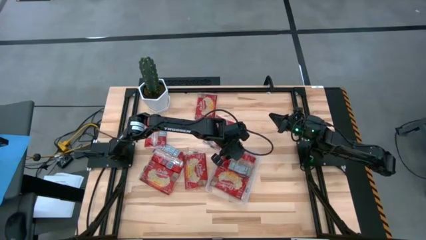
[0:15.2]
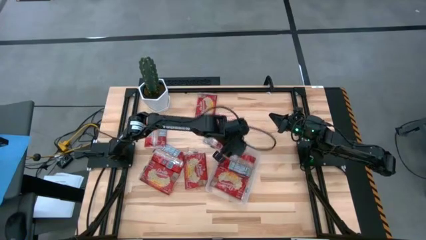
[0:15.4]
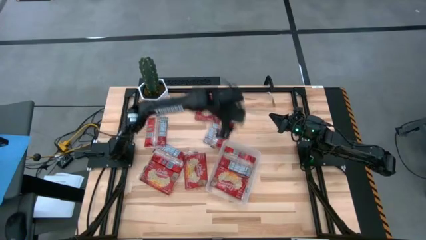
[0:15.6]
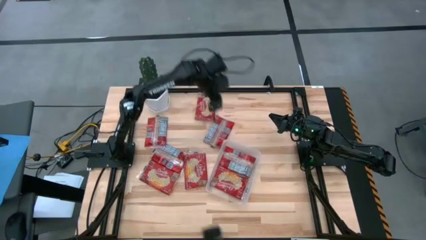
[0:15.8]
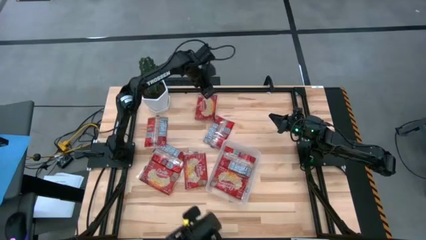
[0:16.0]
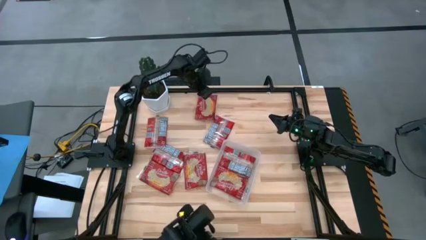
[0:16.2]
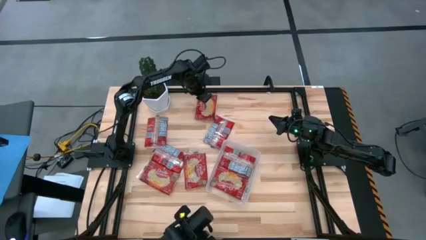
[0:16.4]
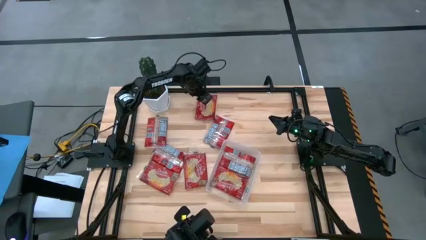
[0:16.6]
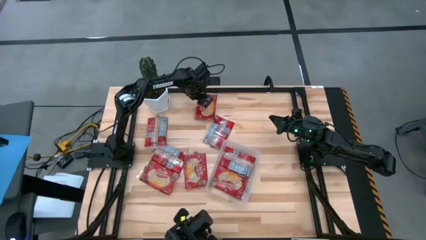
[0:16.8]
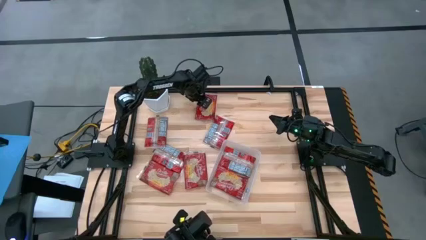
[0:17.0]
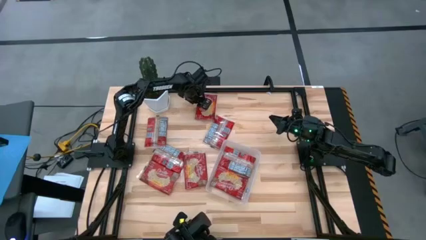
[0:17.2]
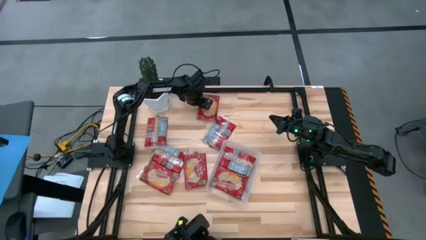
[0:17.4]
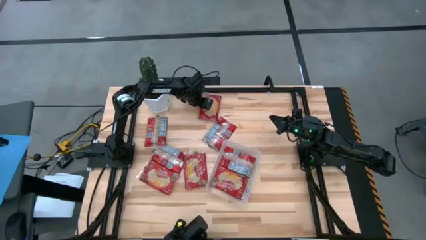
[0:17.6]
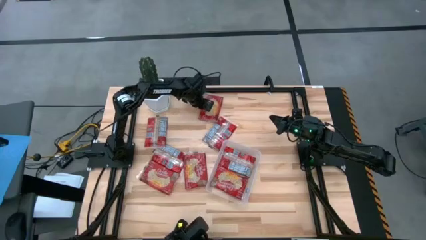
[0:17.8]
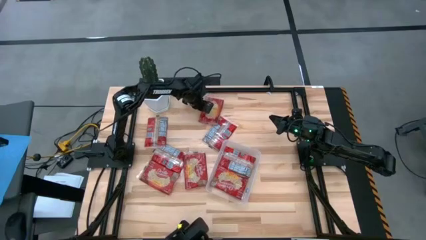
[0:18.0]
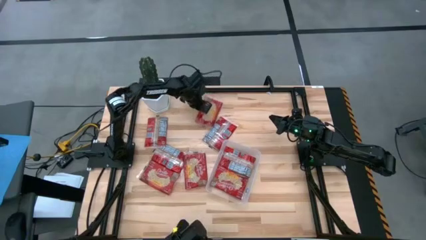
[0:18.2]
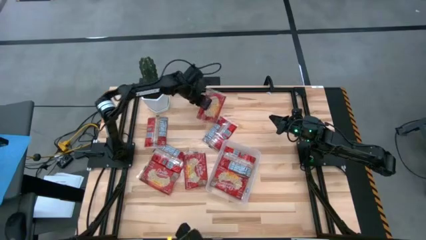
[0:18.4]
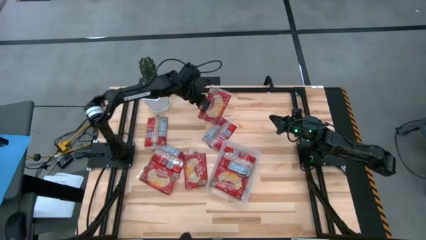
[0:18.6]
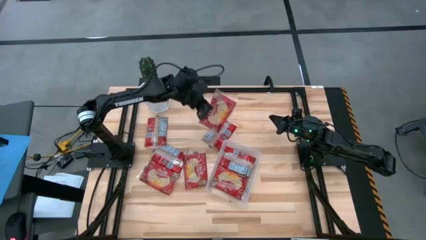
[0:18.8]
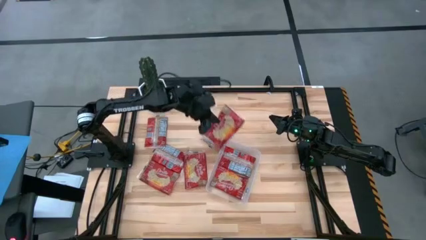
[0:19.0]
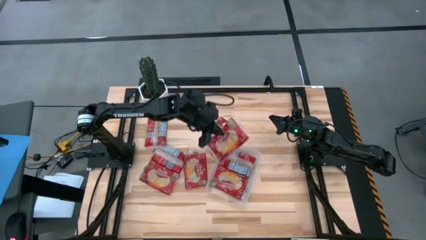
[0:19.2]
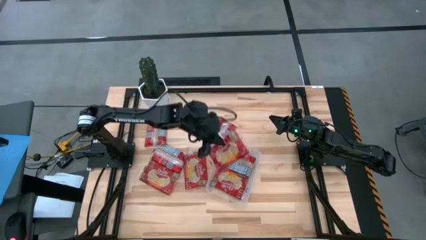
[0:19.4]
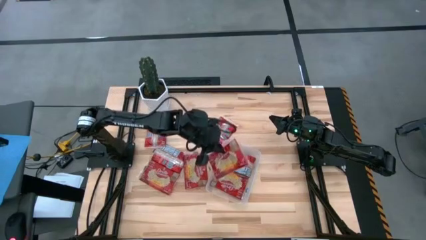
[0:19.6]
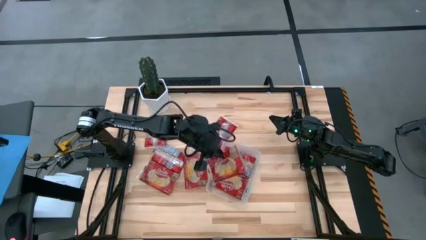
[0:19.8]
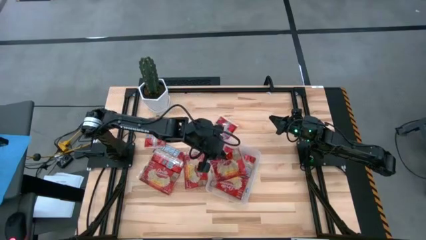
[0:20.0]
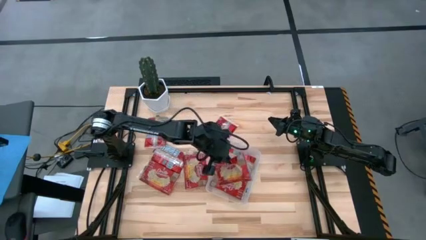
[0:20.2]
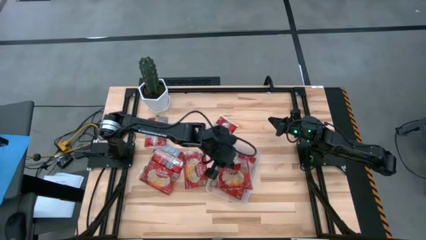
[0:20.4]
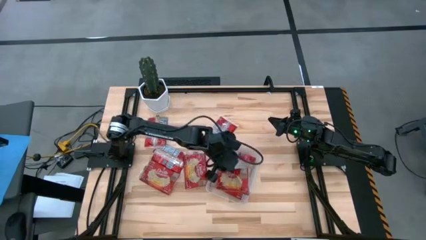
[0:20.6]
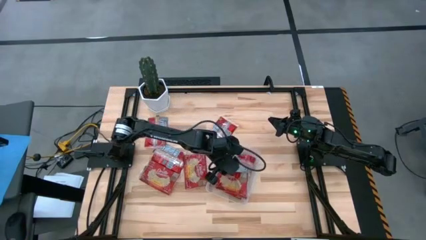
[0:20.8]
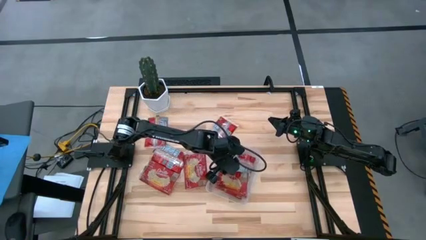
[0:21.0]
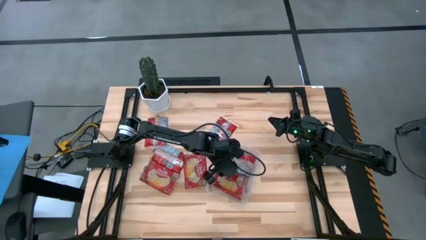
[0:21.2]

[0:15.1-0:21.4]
Task: Sort popcorn bags into baskets
Put the red popcorn bag into the transparent bin

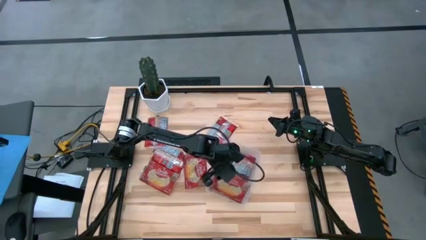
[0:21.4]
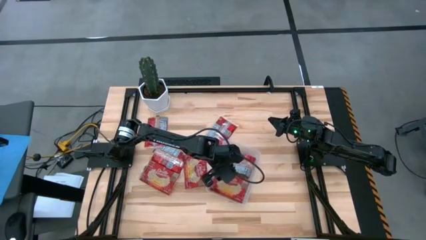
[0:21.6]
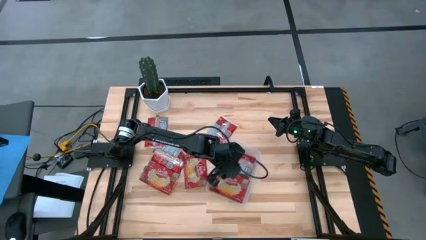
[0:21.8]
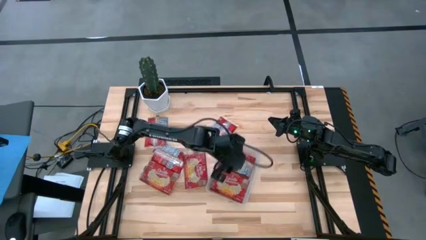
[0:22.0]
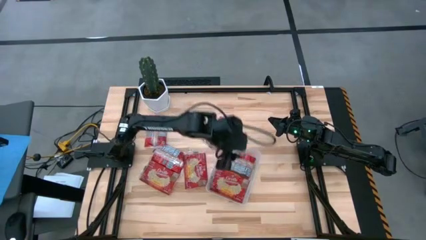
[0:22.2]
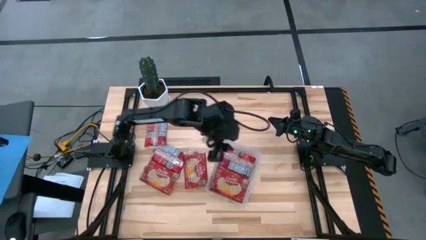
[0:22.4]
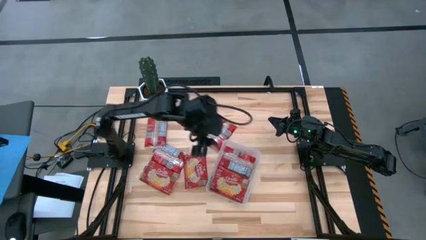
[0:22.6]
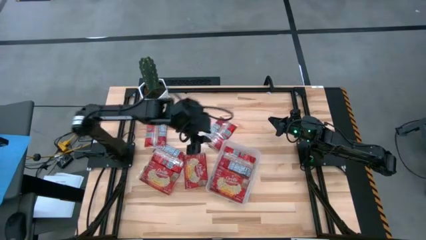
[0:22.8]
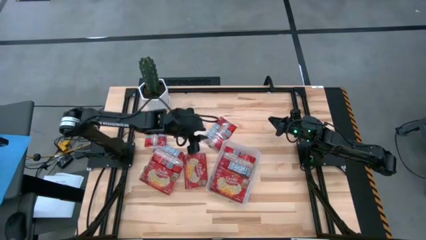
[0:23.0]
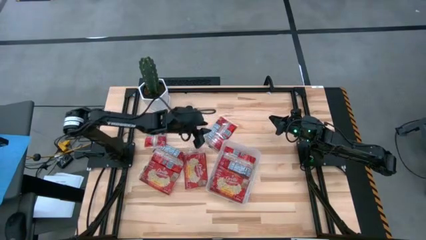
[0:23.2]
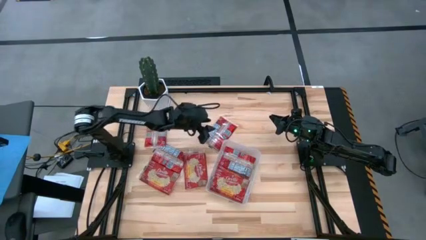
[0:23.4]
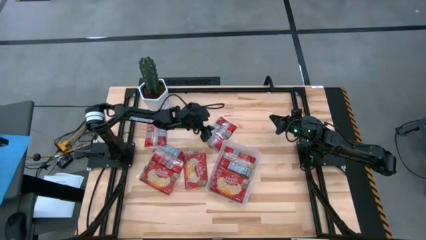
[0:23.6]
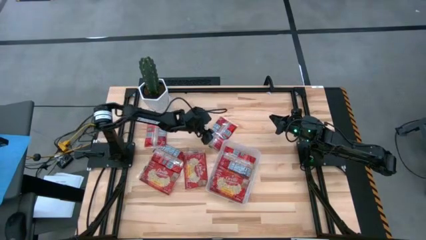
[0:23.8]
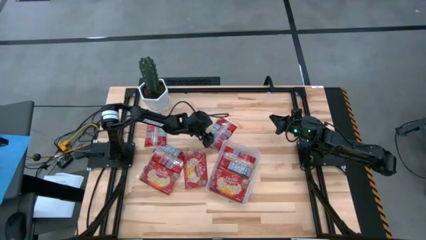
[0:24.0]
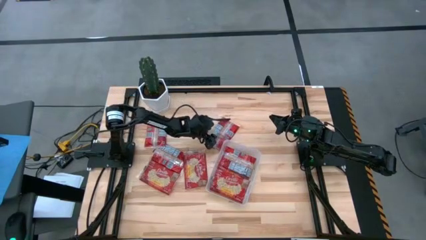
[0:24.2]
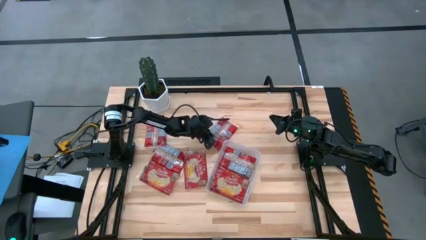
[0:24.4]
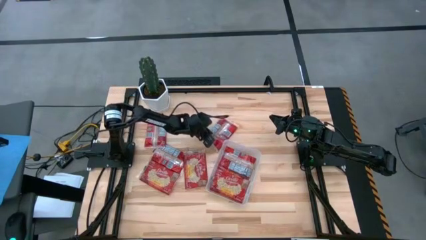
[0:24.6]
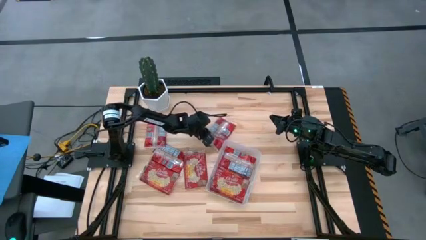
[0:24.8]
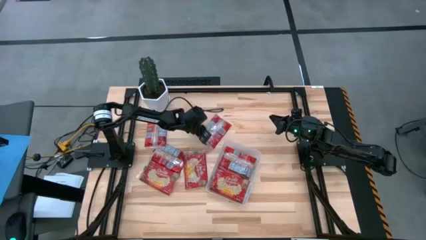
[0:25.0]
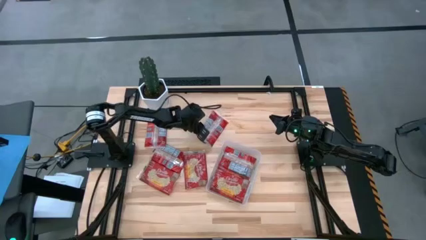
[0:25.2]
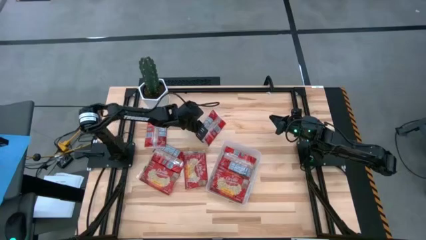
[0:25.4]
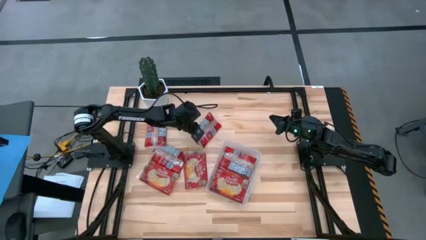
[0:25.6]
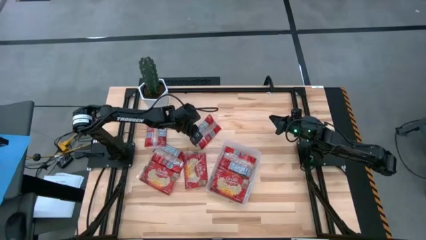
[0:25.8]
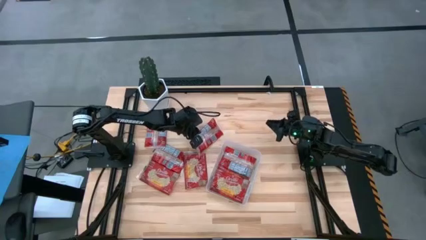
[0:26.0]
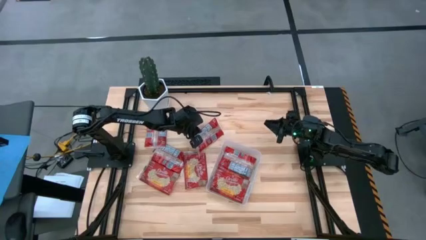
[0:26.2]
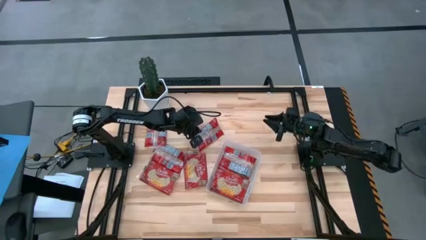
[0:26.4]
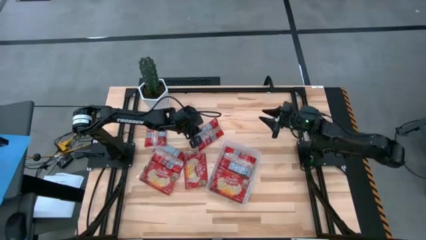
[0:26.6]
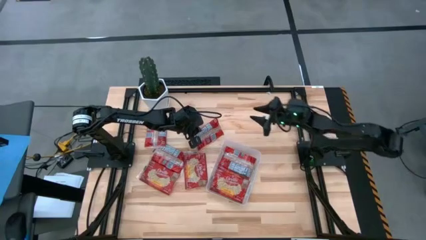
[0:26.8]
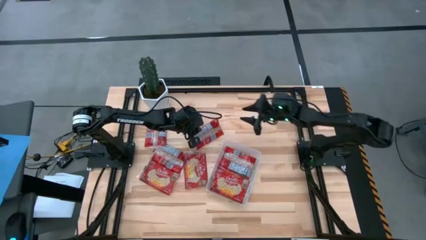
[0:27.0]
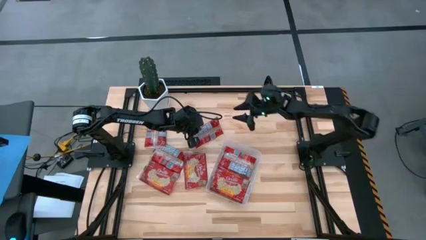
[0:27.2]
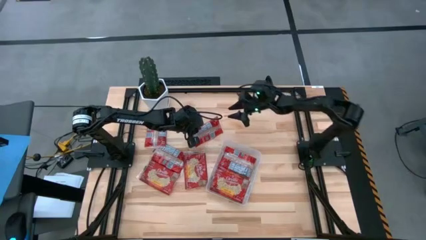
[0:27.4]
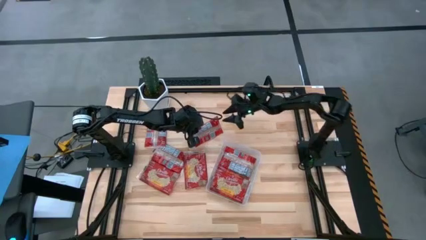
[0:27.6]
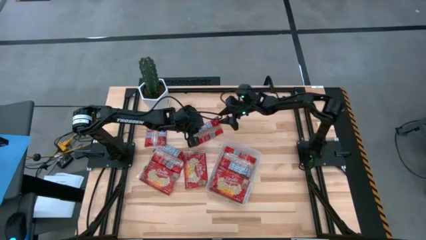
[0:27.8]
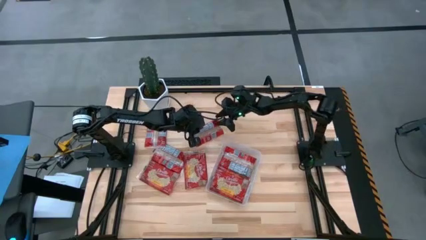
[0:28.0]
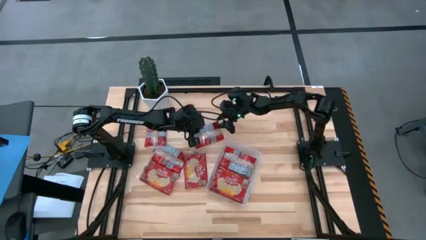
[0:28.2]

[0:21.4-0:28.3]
Put the red popcorn bag into the transparent bin

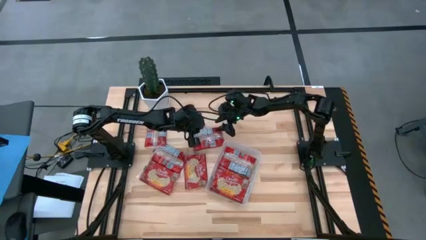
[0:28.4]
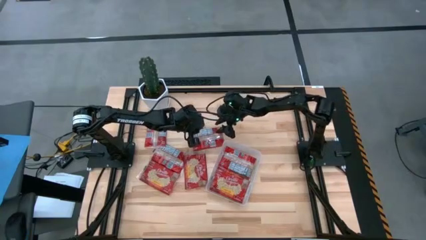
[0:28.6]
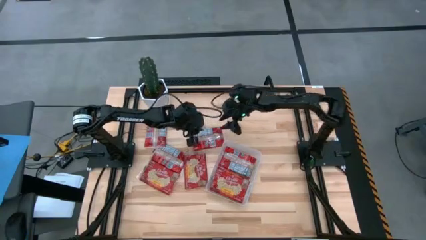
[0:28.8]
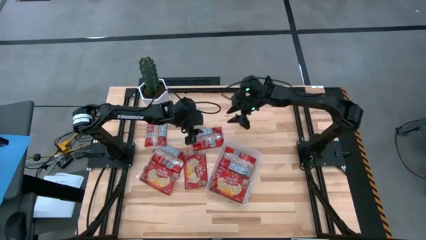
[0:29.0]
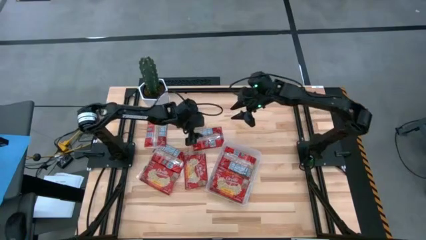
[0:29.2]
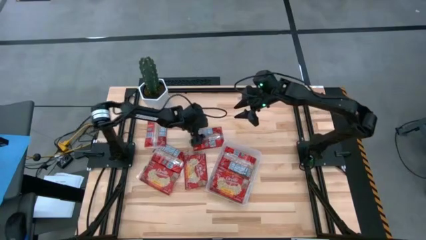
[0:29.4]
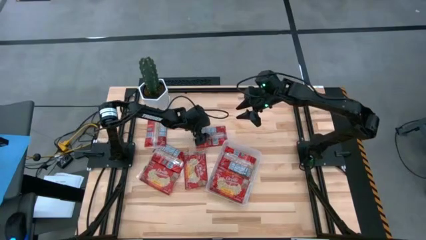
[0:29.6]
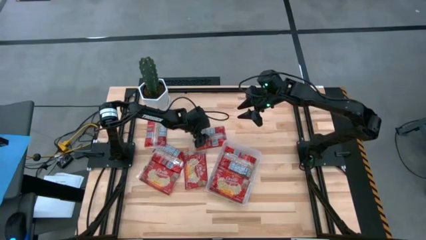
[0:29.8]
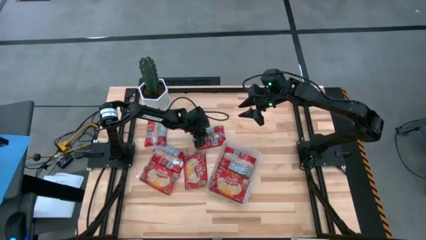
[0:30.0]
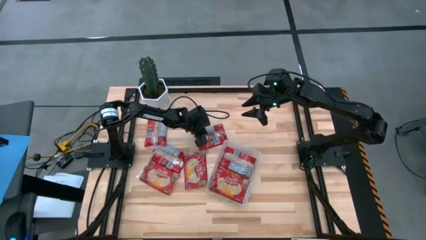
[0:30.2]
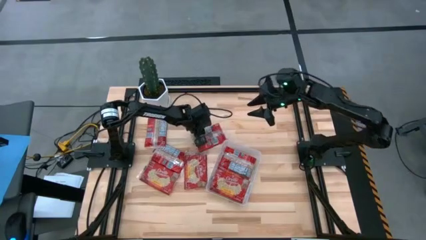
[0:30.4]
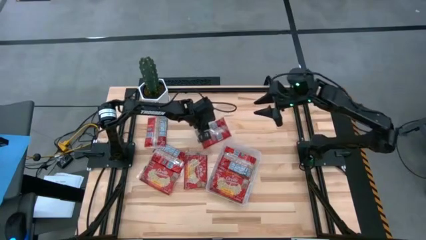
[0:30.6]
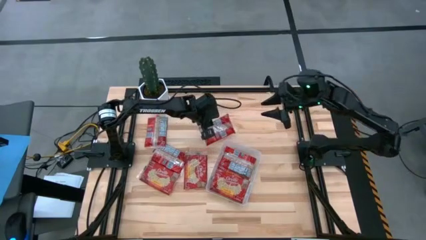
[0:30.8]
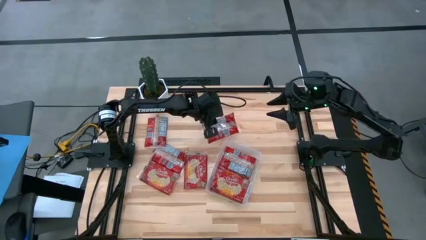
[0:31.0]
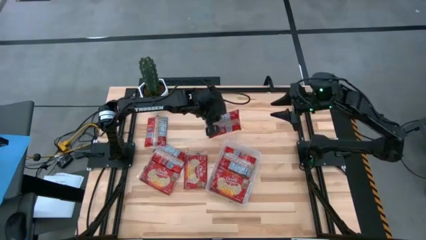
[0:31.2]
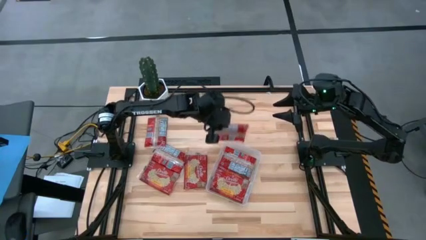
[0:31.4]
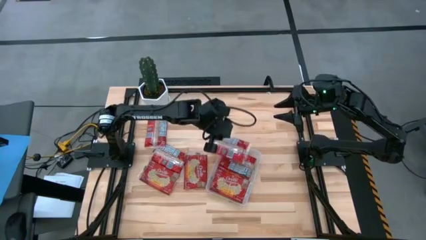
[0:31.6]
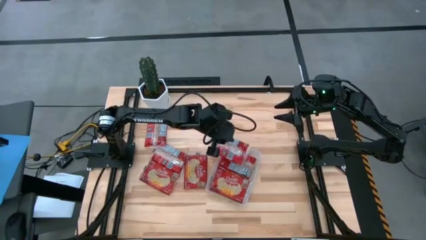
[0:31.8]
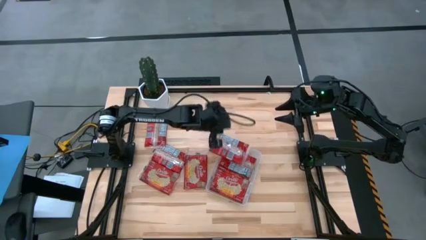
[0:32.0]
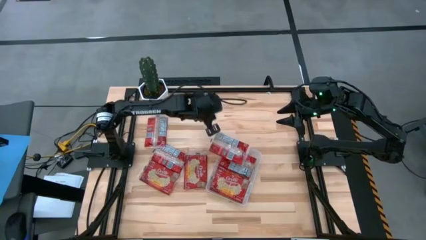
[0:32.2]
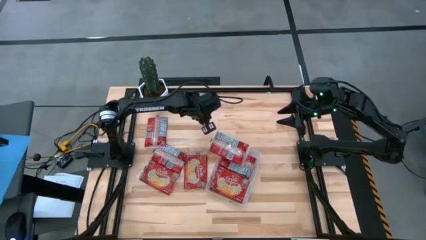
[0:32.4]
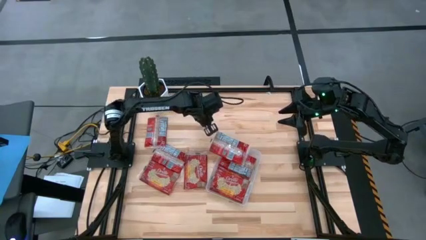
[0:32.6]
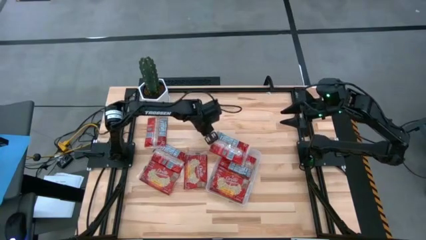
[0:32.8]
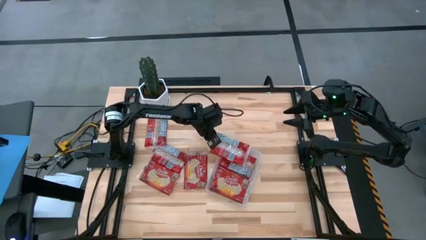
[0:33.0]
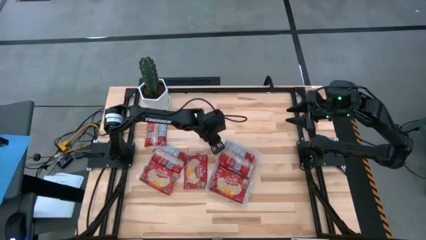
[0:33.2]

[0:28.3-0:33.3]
Put the red popcorn bag into the transparent bin
